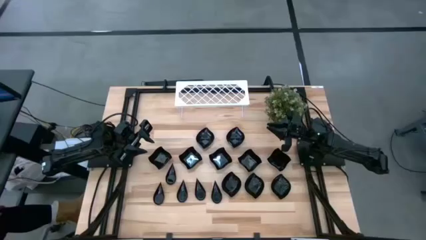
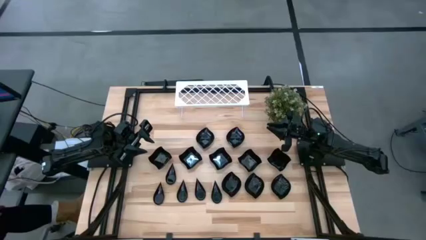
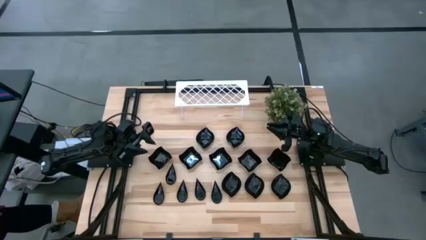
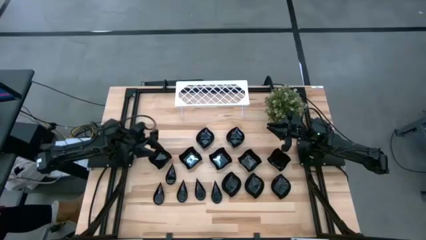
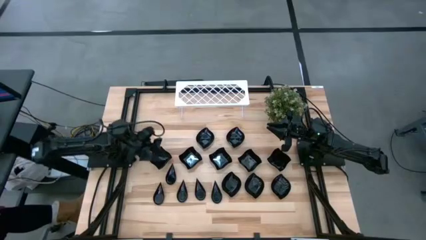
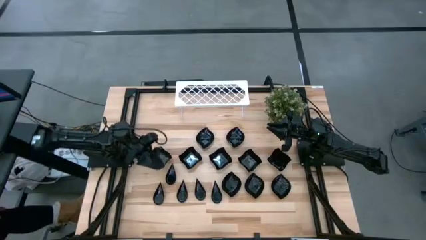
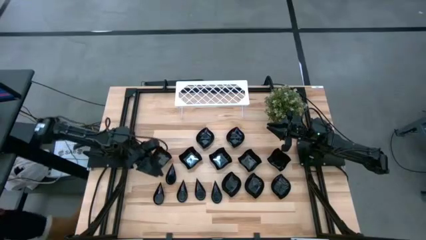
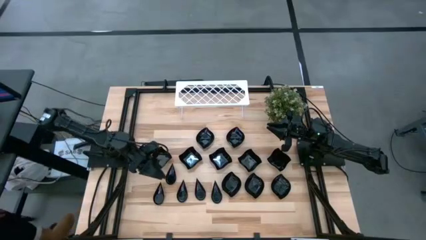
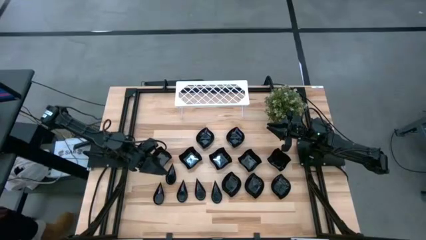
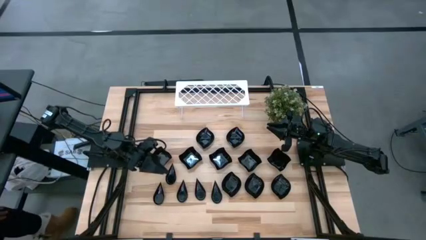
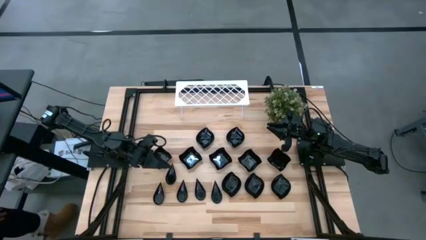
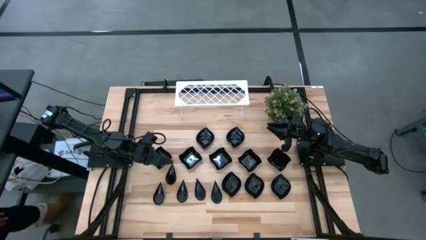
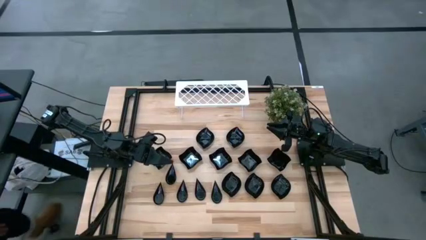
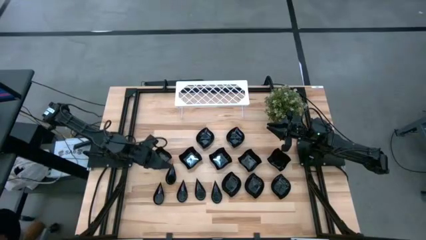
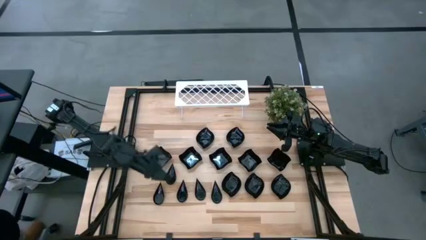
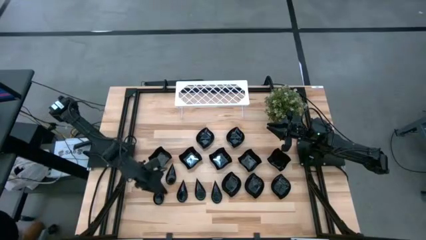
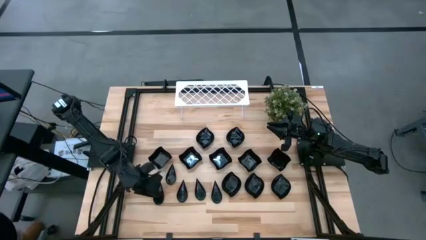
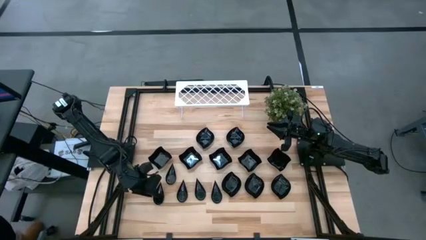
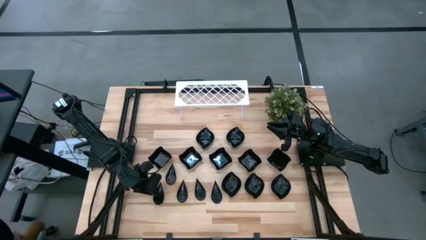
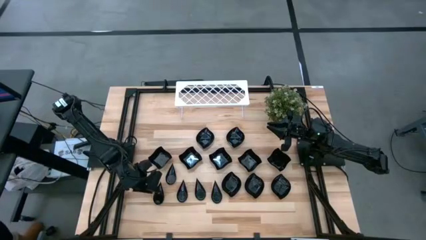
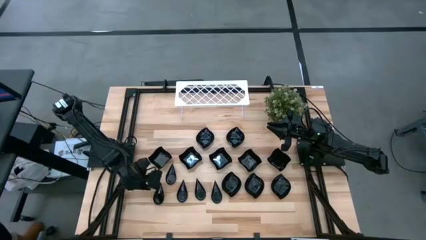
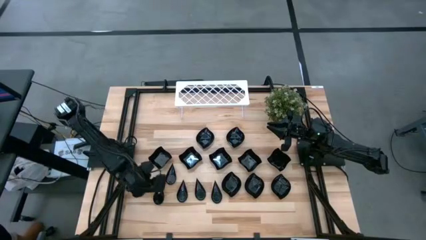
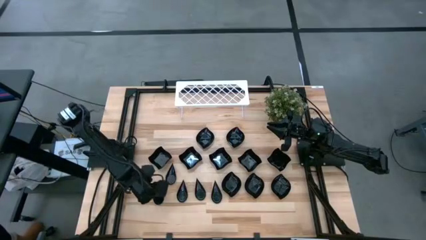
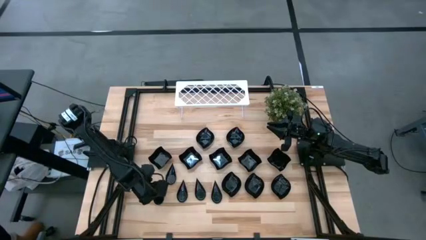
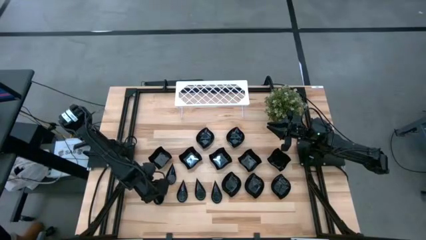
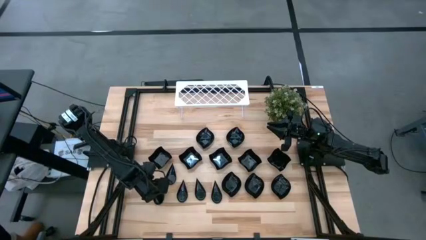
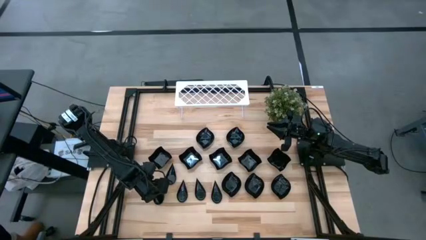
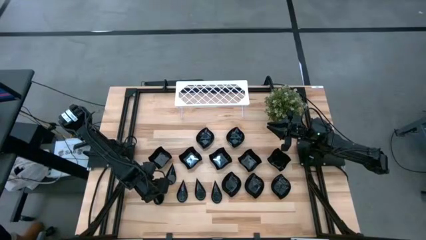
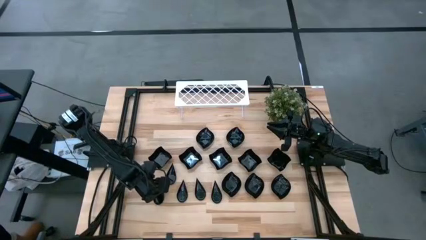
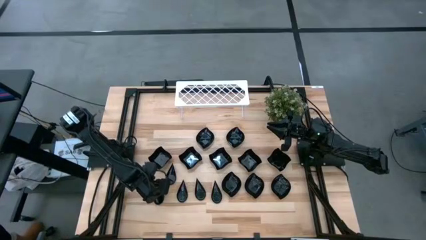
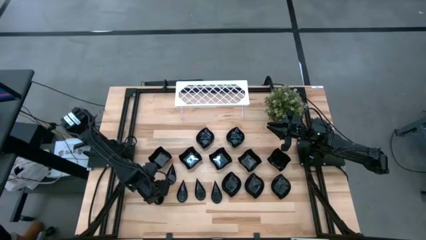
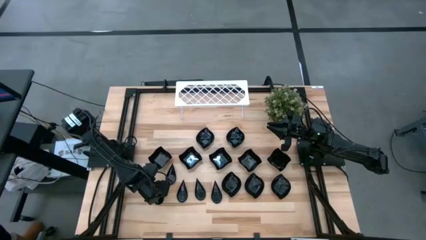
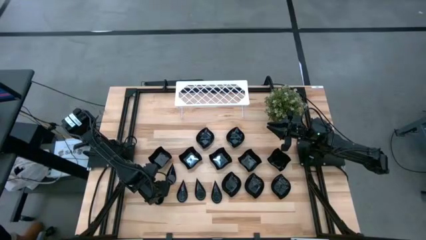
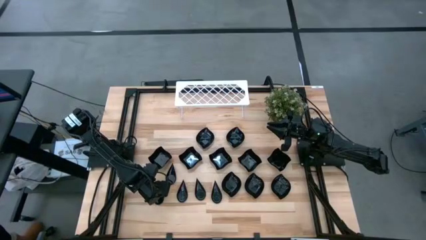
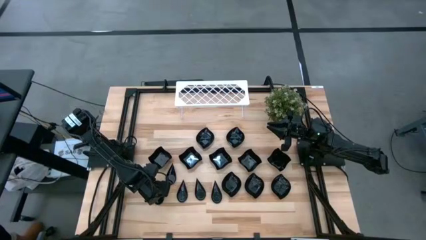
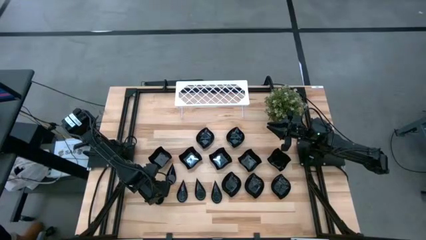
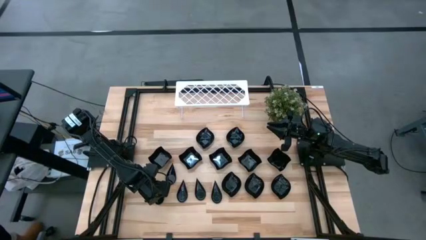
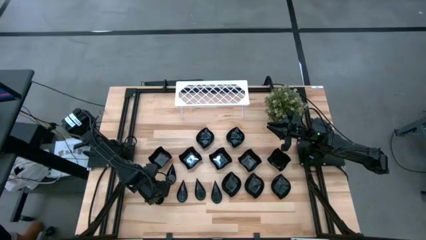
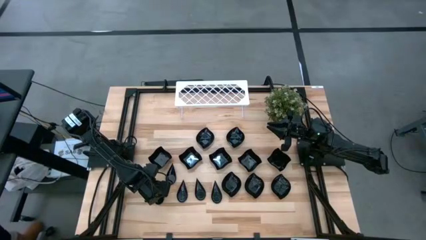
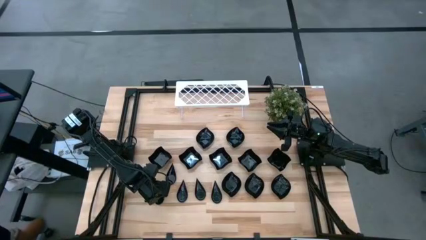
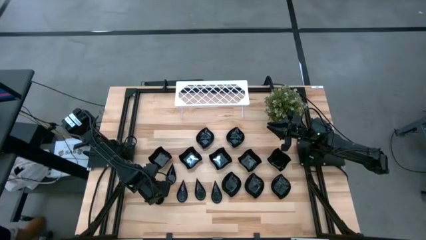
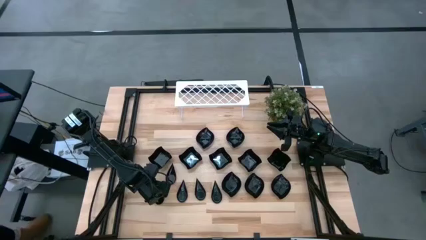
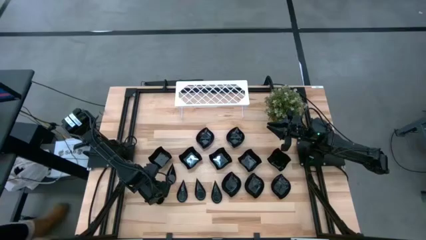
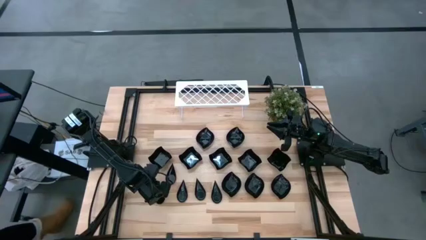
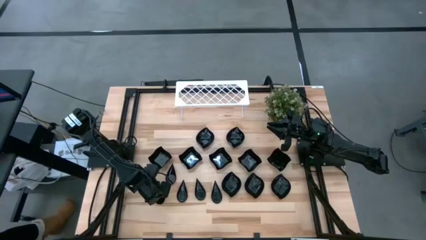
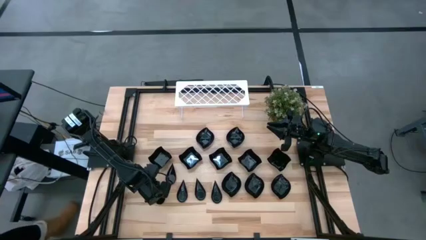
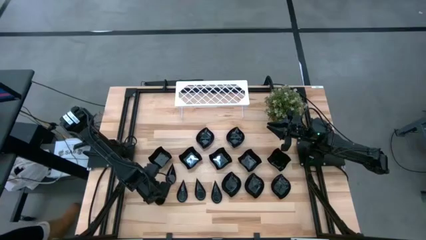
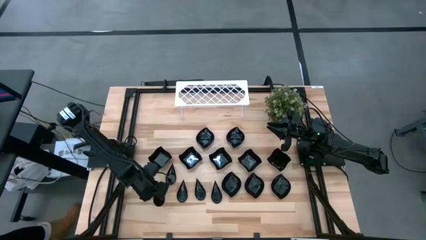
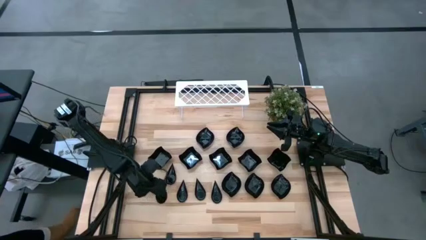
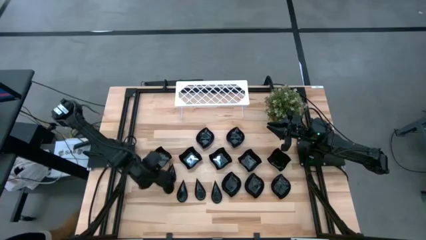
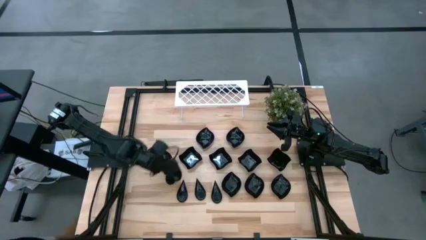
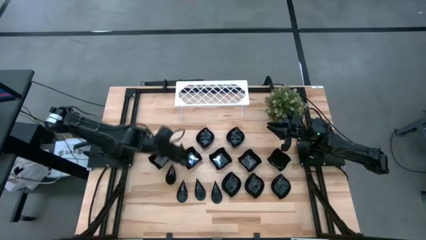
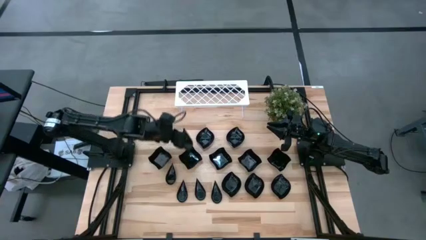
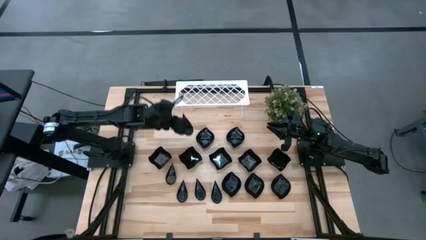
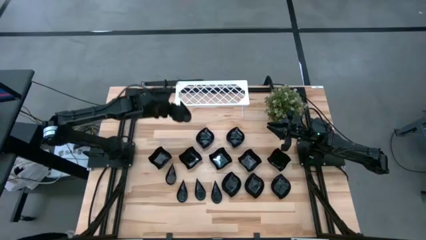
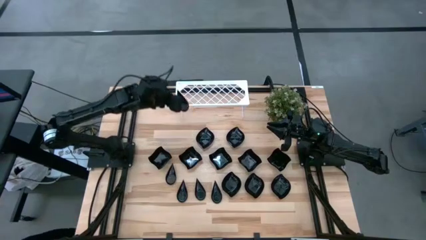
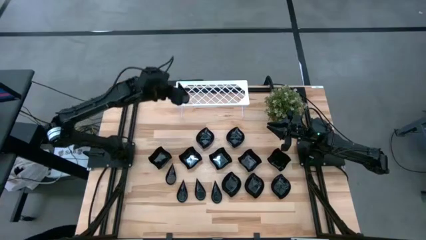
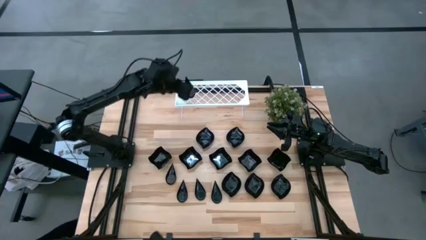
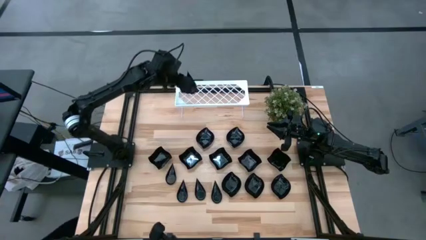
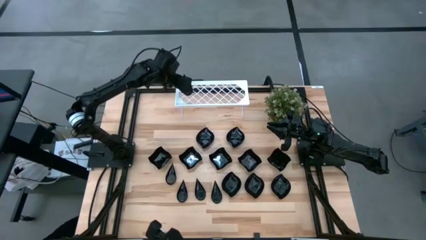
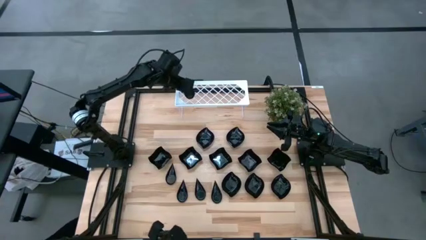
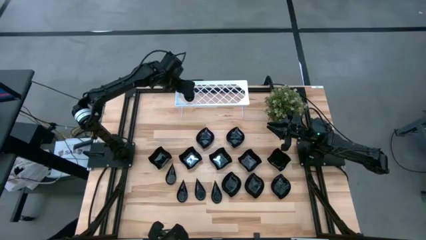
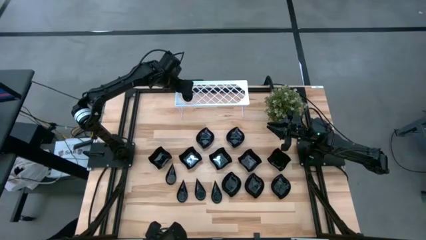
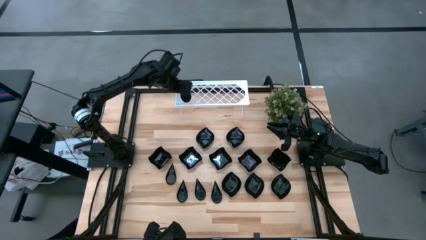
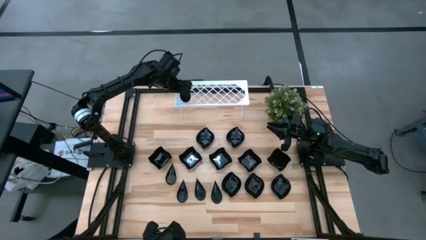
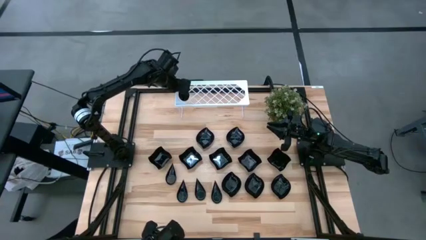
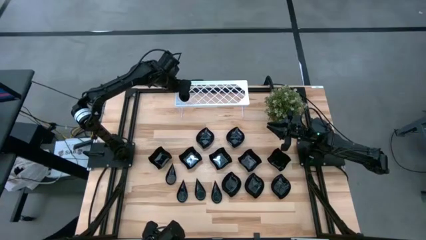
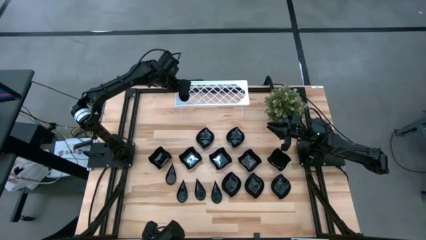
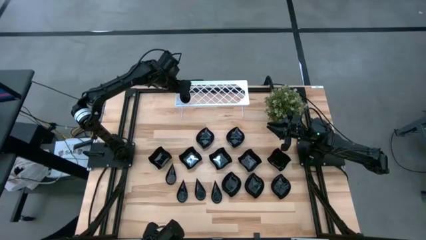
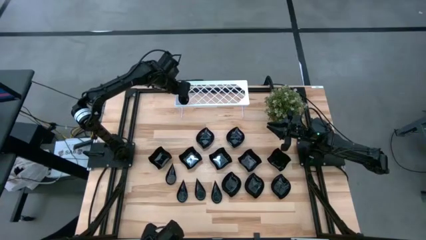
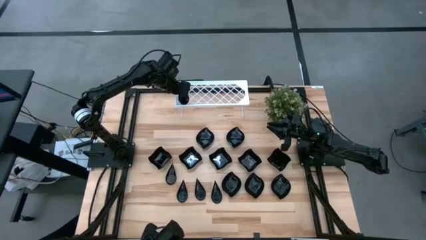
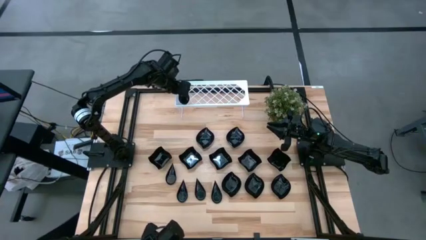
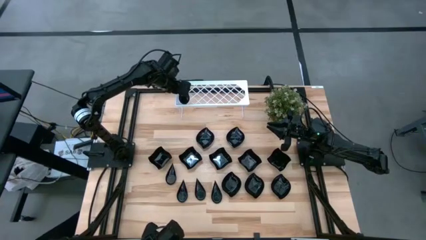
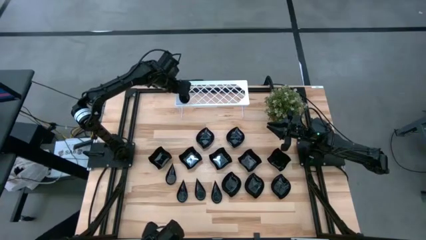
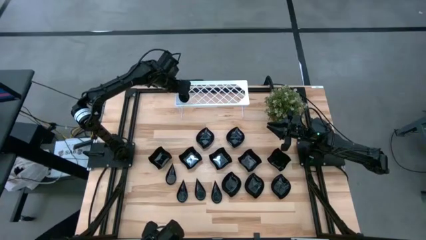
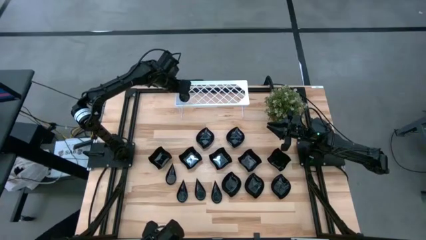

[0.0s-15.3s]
Task: Pick & Place Mini shaped plates
Put the drop shaped plate on the shelf
